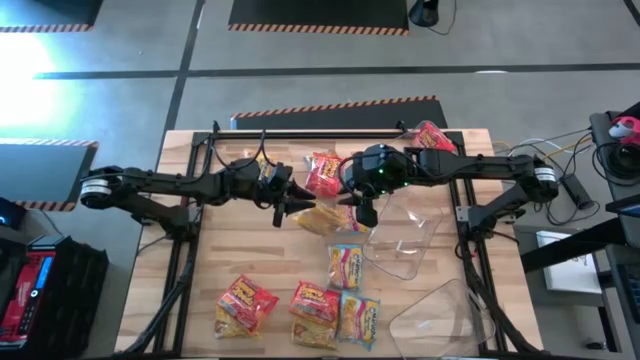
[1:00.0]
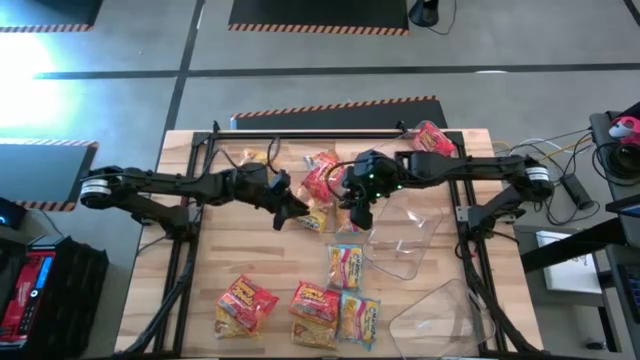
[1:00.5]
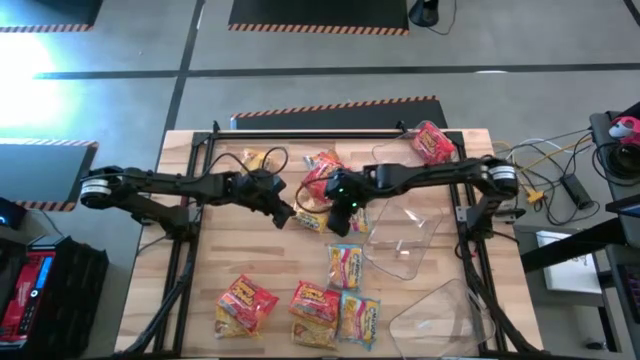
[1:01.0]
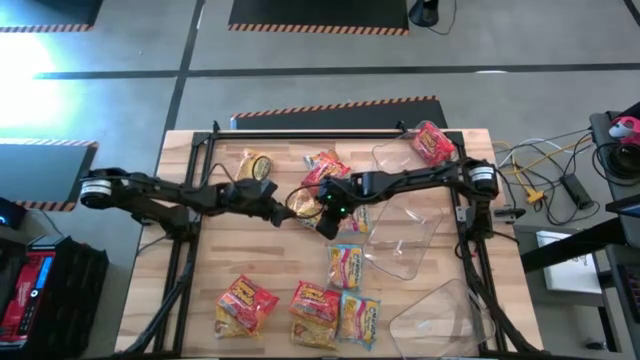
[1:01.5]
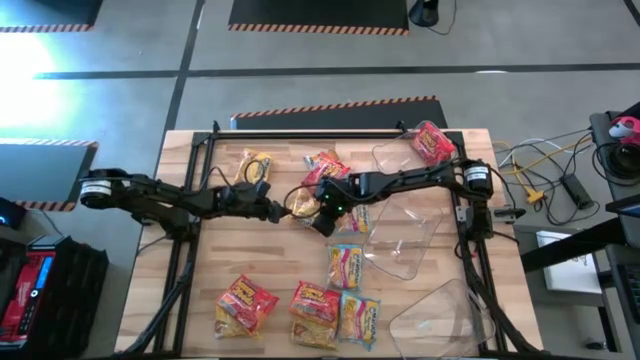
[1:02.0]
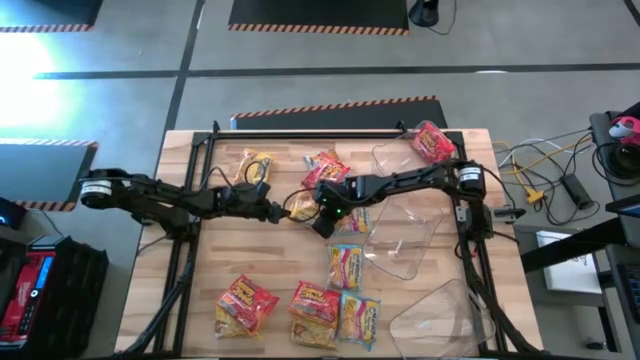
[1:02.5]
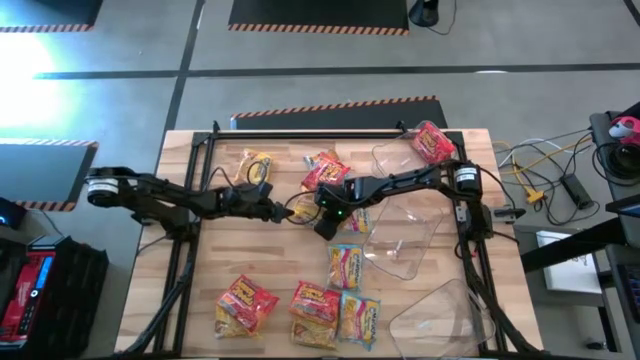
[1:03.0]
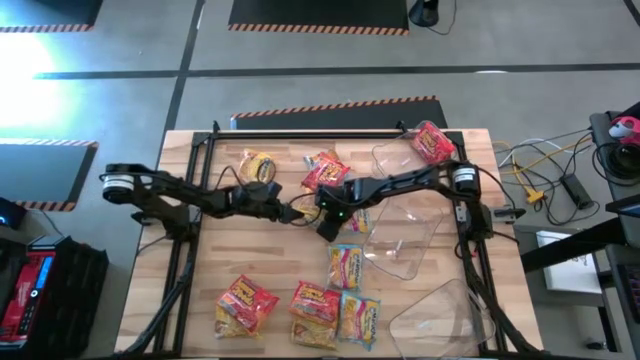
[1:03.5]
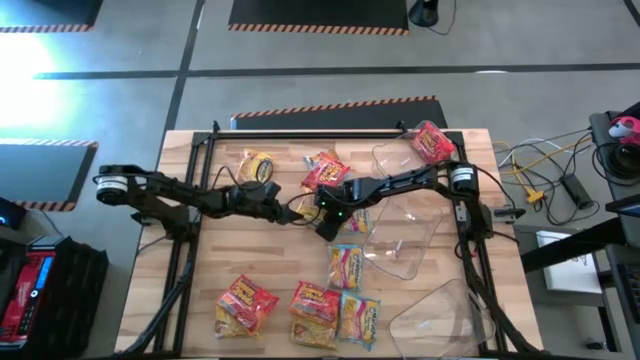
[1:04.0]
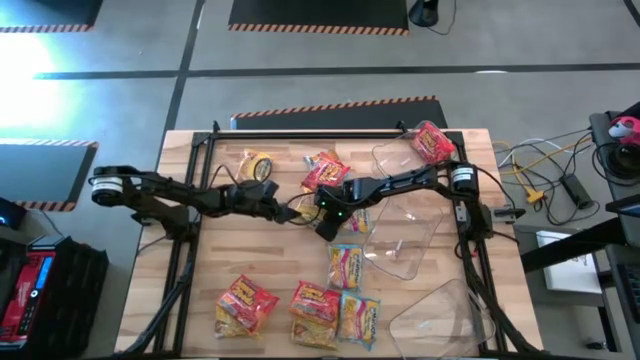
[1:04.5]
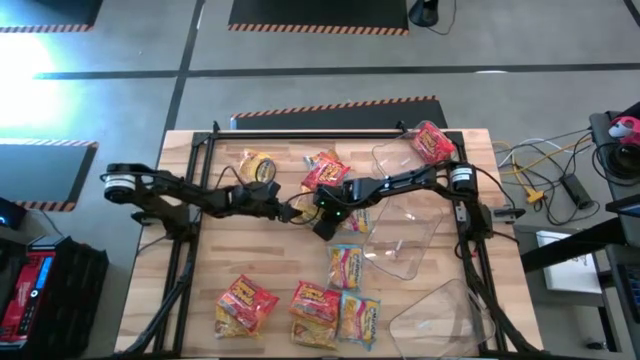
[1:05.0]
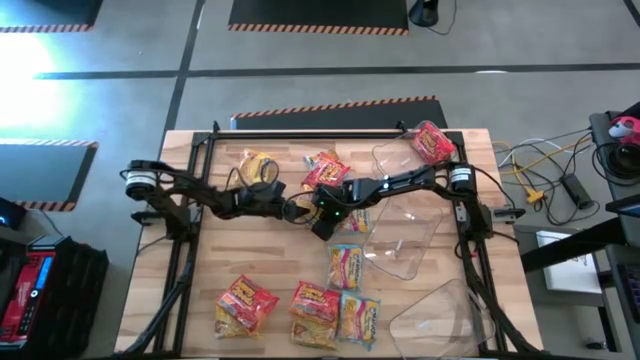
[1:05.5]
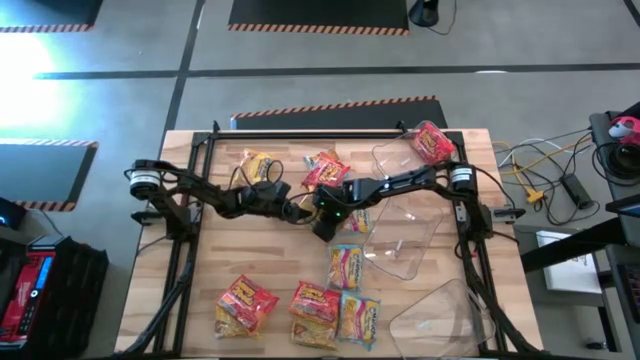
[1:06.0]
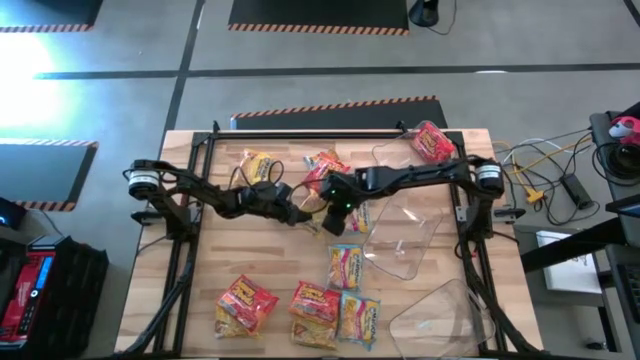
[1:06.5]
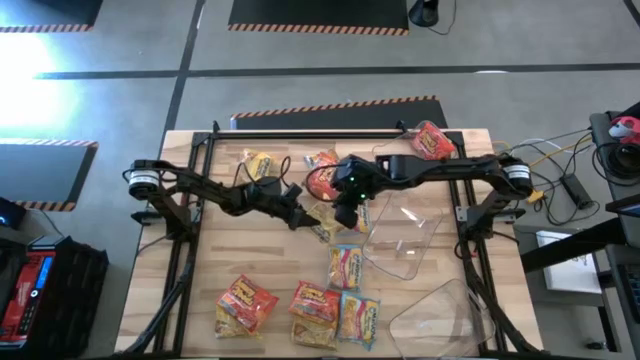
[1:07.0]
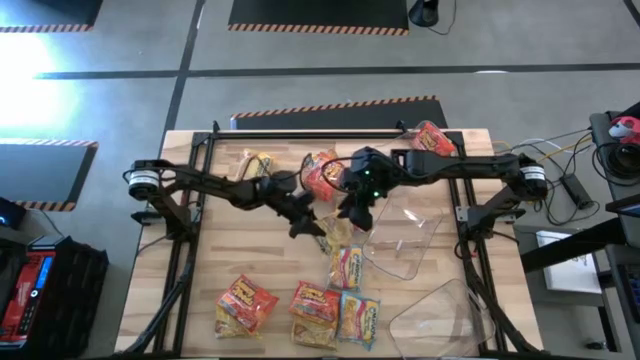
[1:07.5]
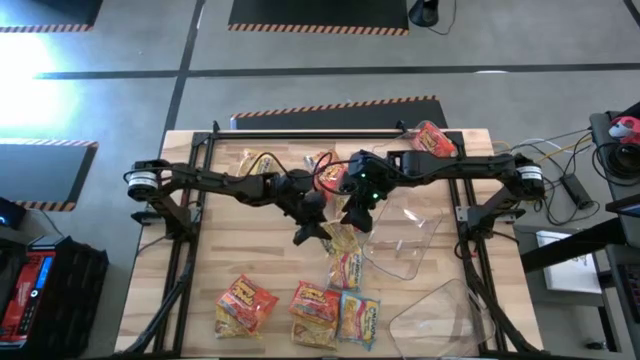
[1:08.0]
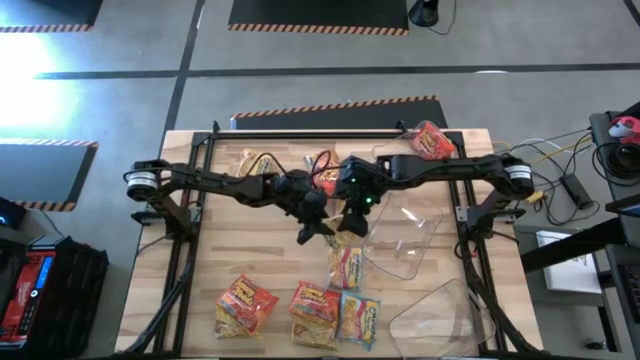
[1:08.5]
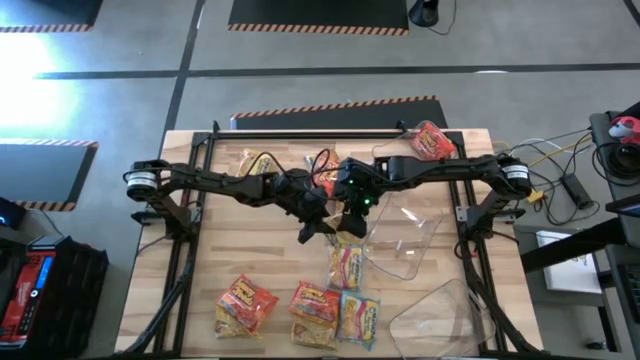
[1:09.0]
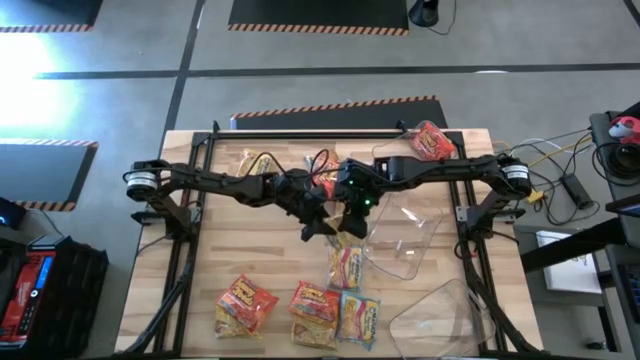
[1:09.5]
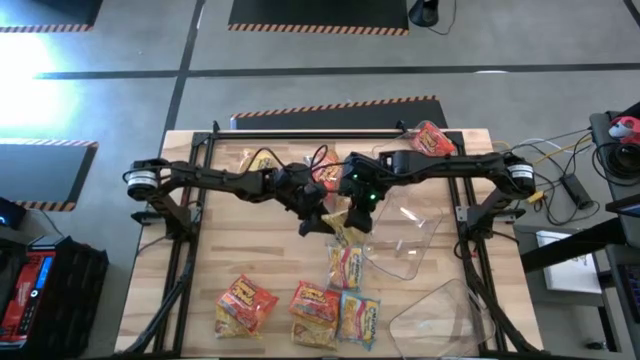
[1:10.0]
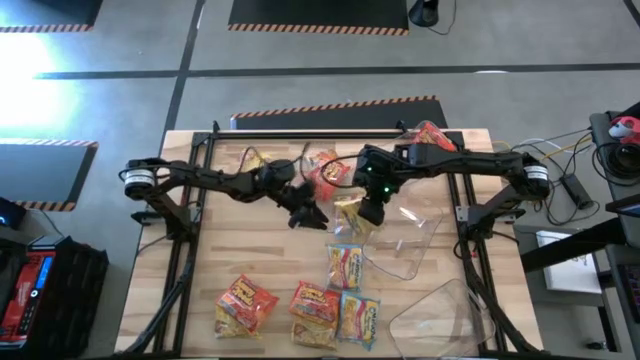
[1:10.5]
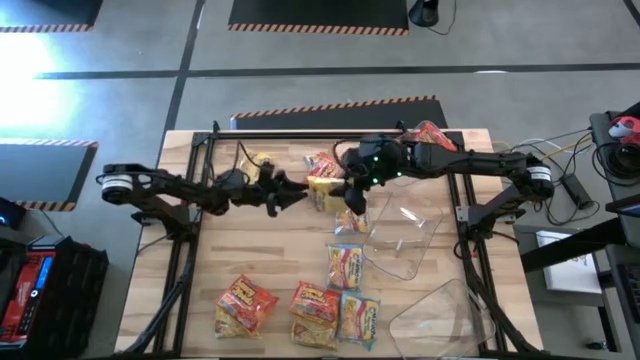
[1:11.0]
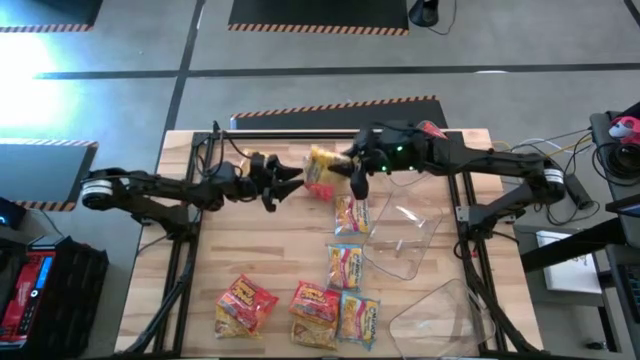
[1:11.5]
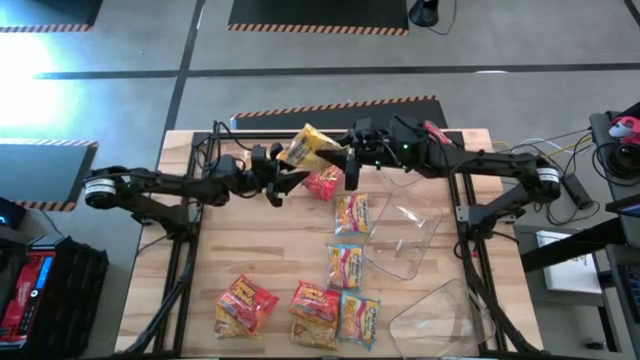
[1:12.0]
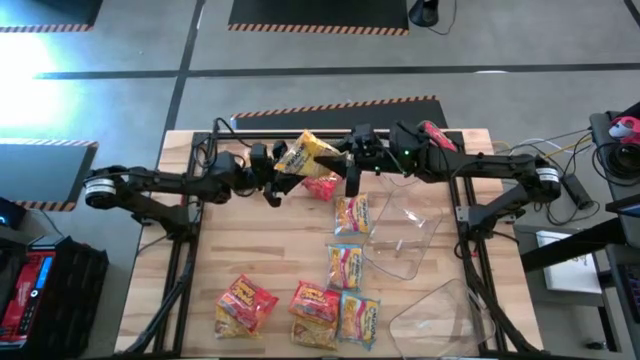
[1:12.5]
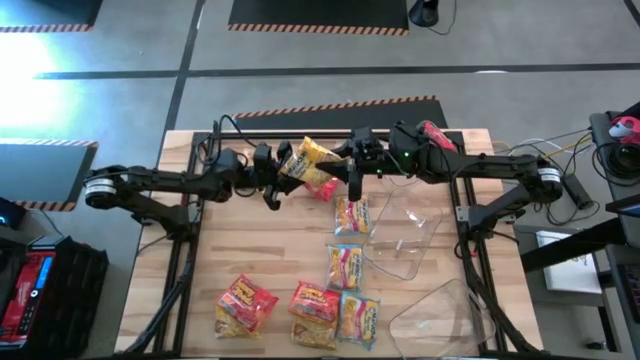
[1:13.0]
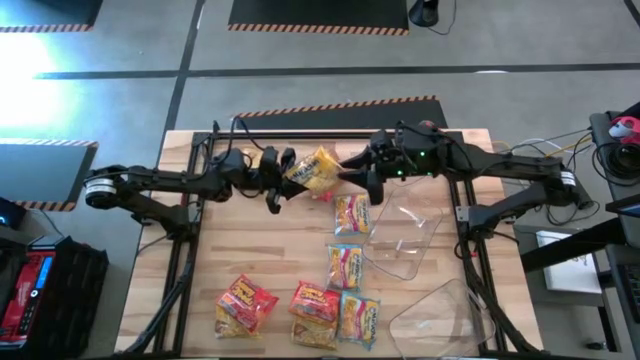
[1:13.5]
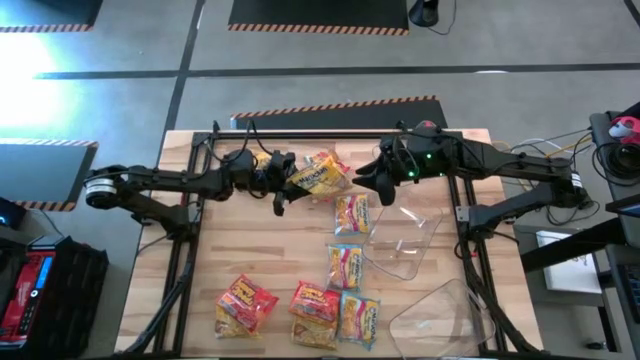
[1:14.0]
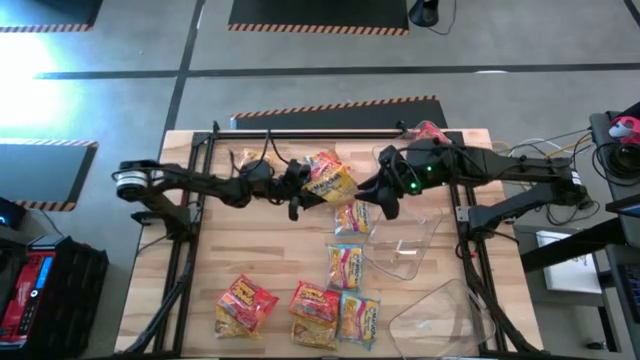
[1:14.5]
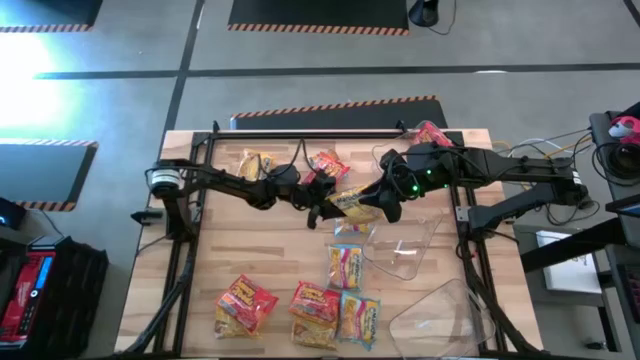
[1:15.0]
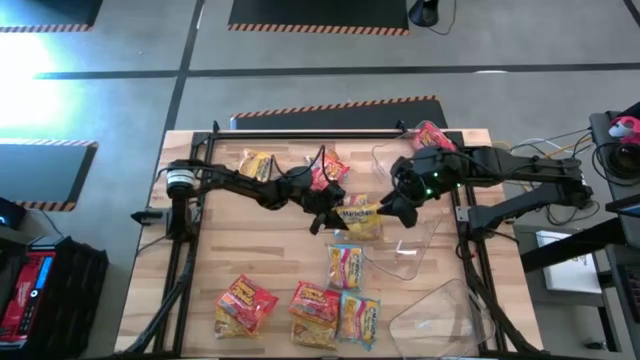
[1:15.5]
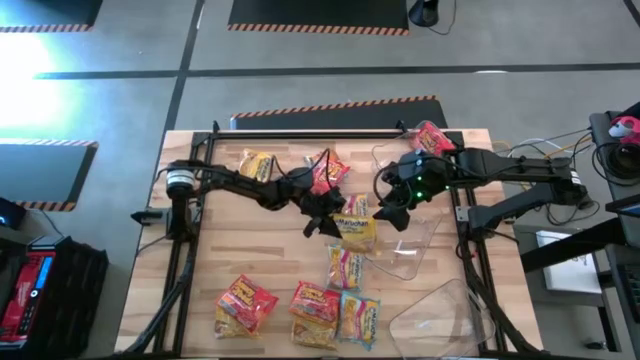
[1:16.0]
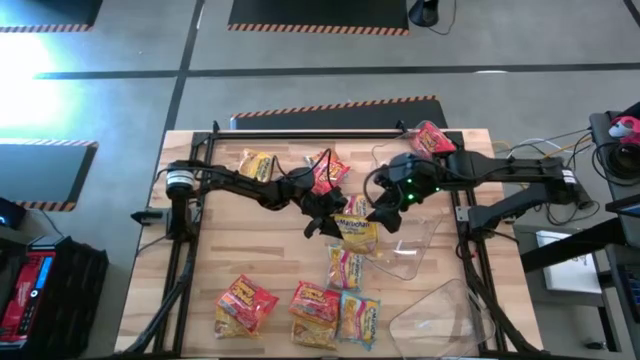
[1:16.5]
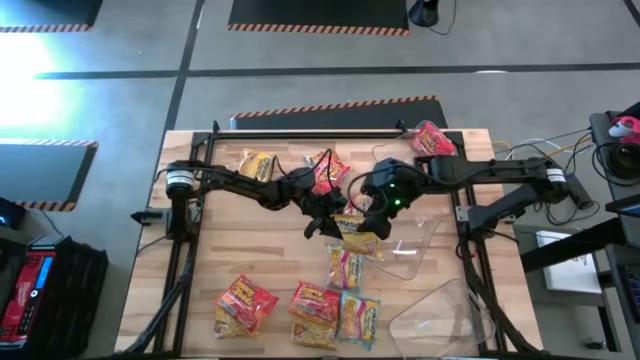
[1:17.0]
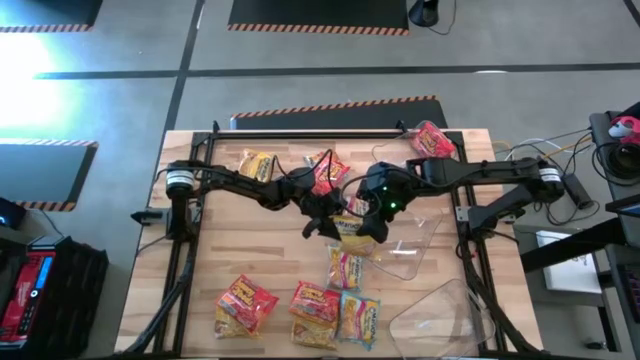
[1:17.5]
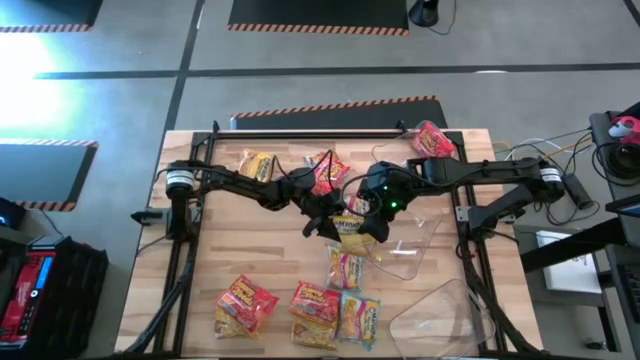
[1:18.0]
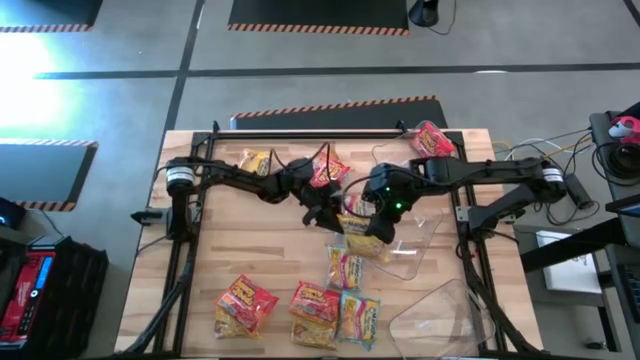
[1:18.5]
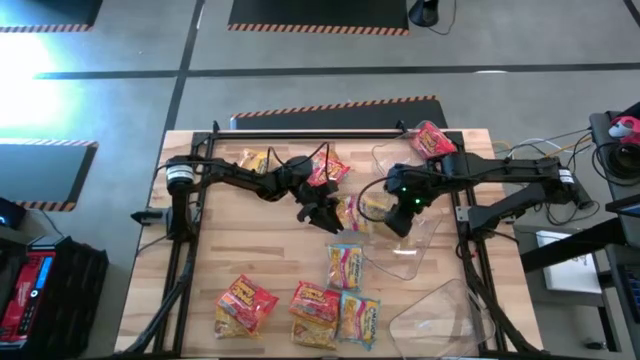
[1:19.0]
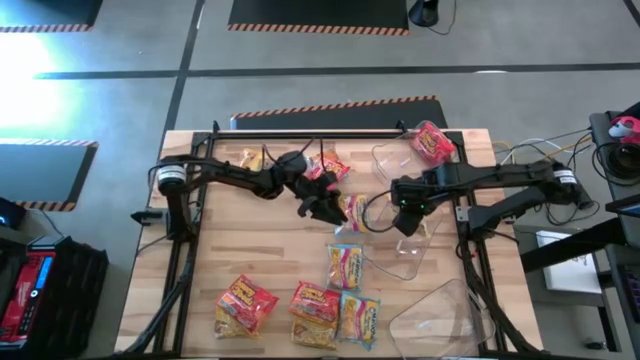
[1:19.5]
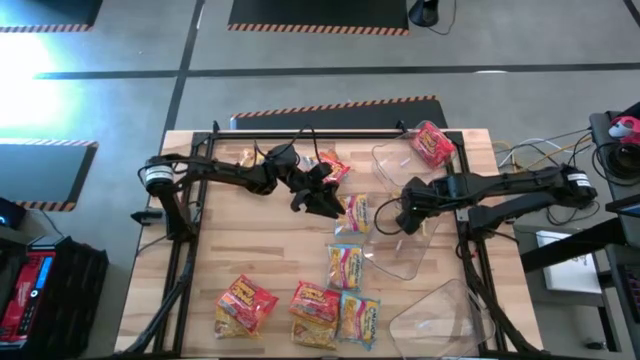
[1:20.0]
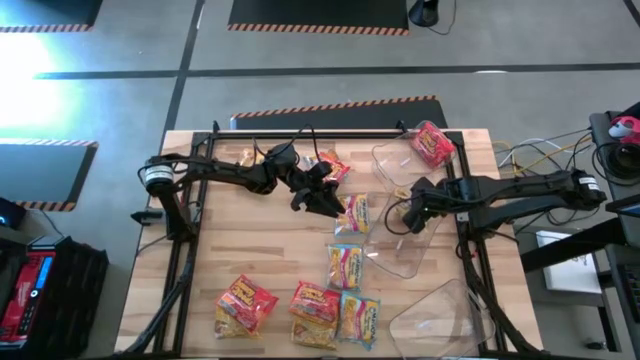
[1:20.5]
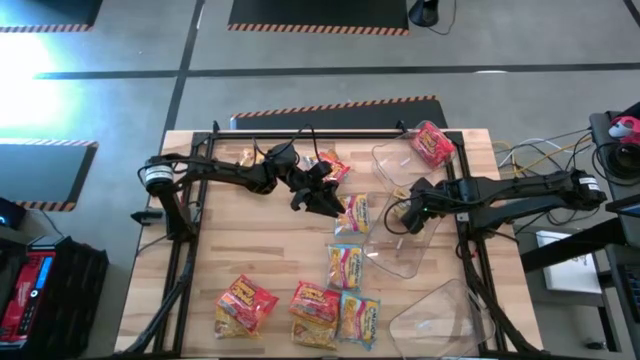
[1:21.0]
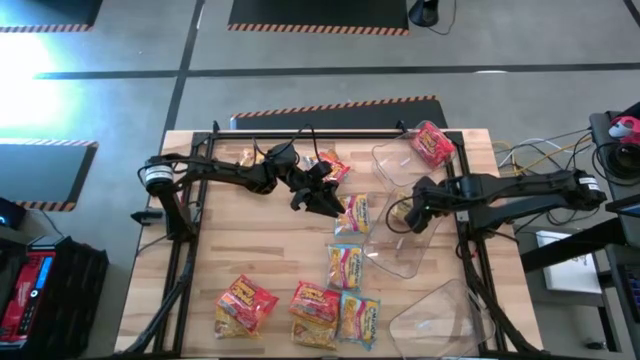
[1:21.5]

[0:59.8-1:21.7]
Task: Sort Maruchan noodles
Put the yellow noodle pack into the middle transparent bin
